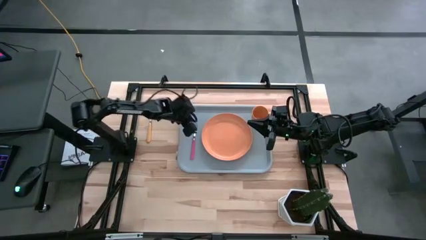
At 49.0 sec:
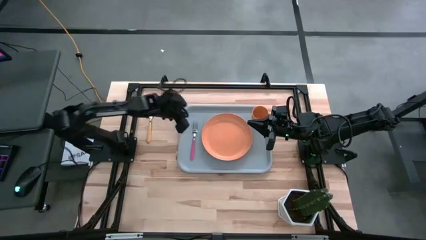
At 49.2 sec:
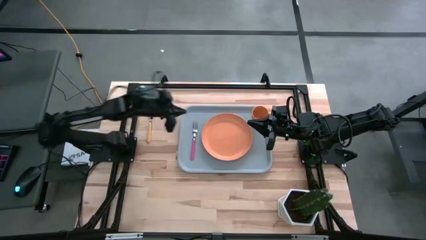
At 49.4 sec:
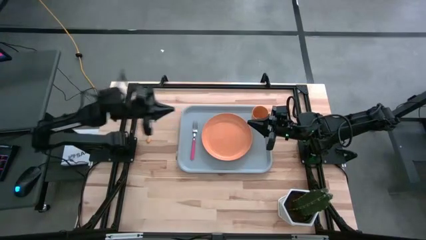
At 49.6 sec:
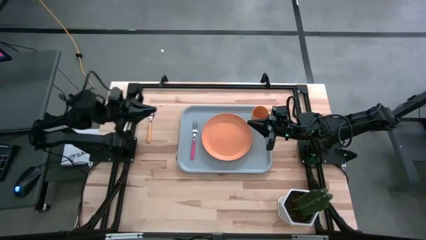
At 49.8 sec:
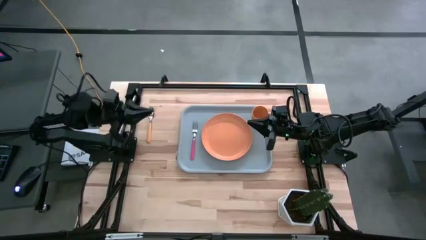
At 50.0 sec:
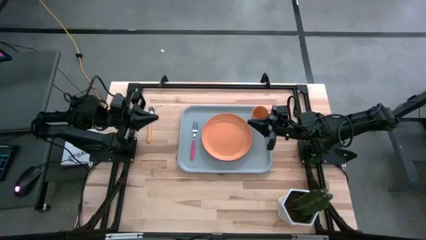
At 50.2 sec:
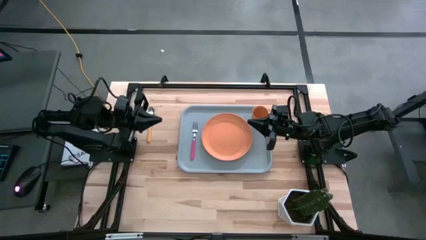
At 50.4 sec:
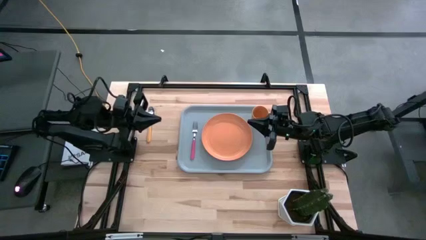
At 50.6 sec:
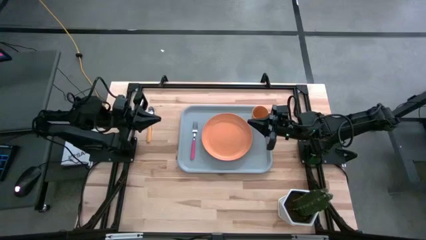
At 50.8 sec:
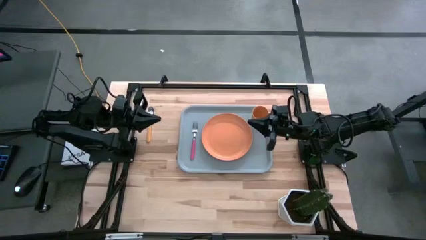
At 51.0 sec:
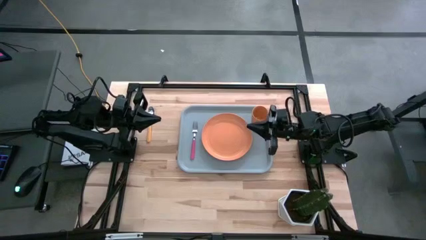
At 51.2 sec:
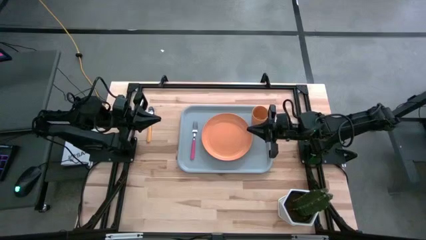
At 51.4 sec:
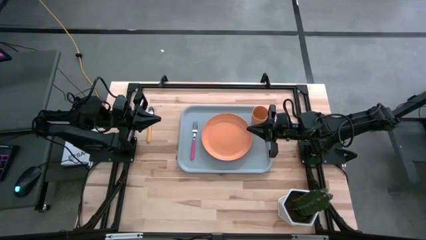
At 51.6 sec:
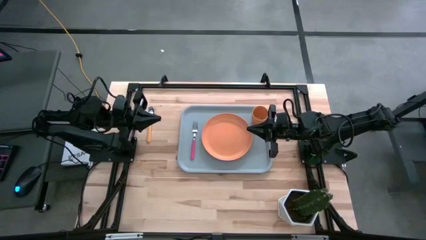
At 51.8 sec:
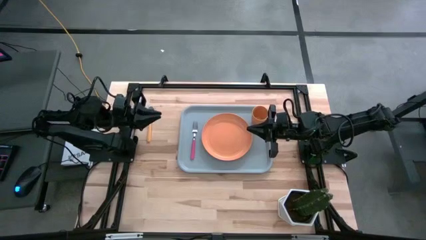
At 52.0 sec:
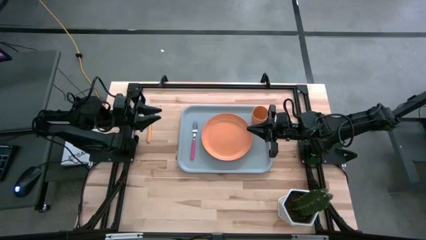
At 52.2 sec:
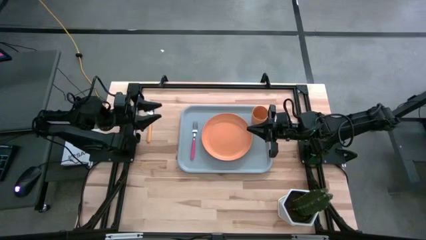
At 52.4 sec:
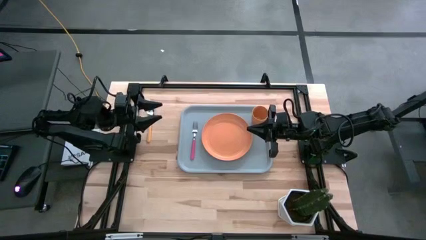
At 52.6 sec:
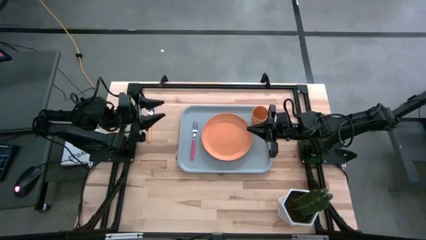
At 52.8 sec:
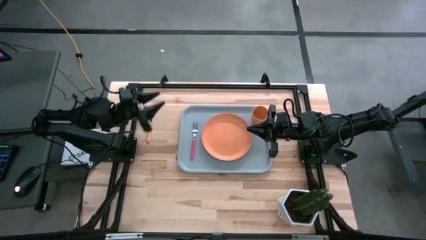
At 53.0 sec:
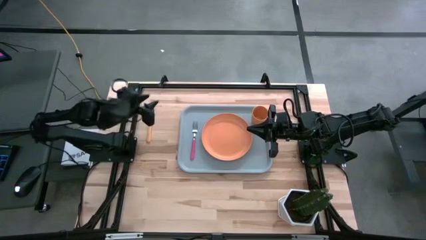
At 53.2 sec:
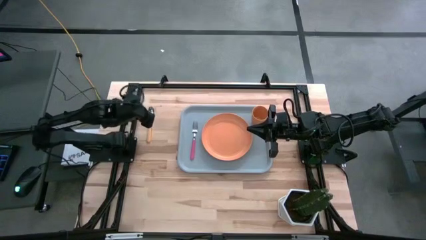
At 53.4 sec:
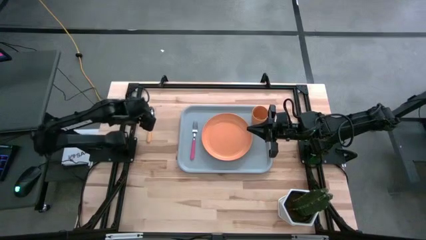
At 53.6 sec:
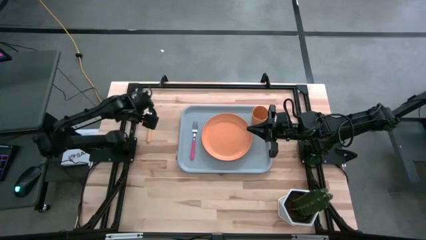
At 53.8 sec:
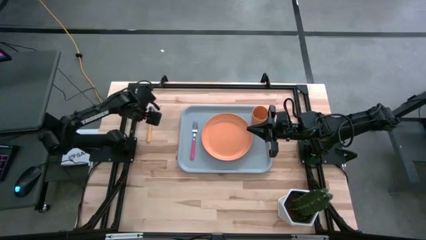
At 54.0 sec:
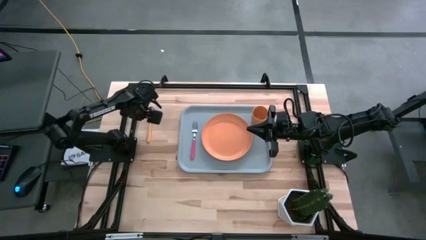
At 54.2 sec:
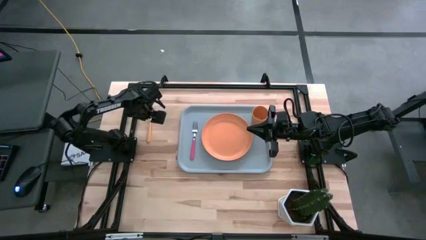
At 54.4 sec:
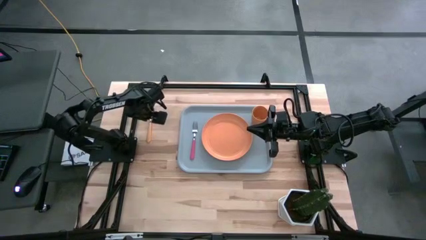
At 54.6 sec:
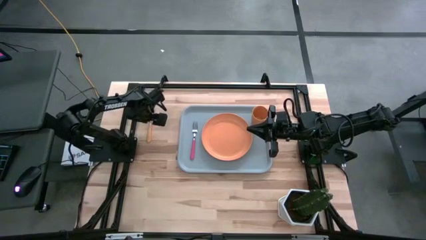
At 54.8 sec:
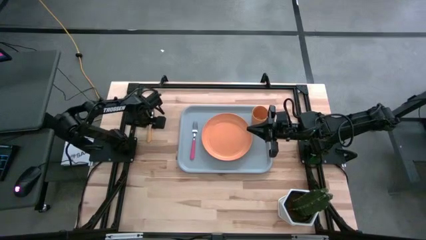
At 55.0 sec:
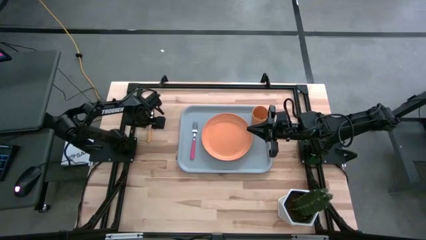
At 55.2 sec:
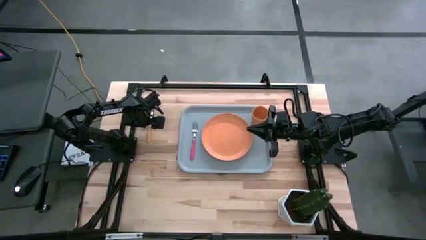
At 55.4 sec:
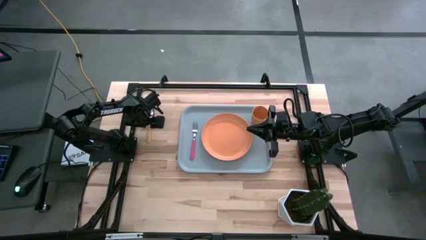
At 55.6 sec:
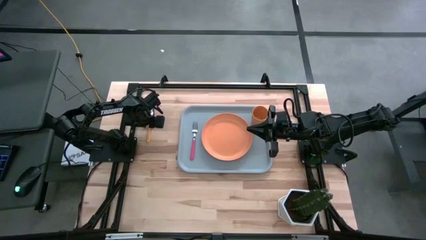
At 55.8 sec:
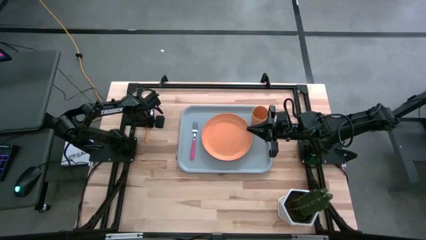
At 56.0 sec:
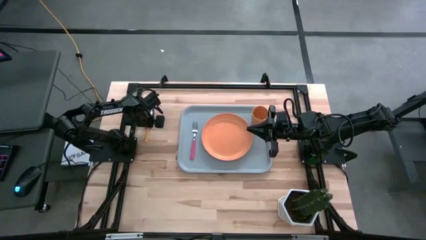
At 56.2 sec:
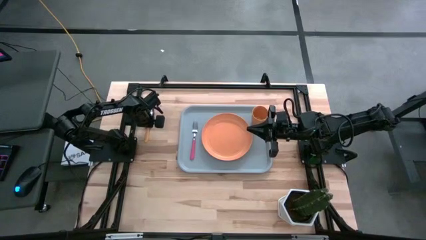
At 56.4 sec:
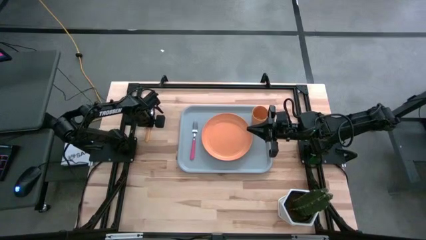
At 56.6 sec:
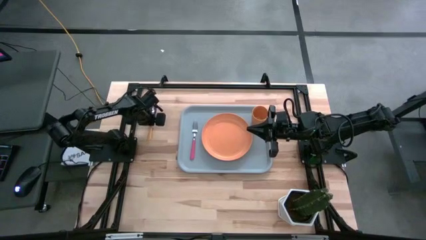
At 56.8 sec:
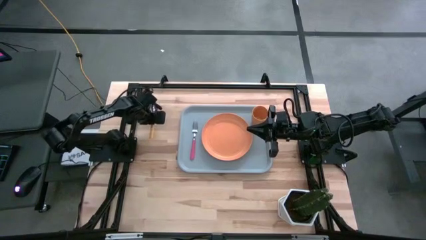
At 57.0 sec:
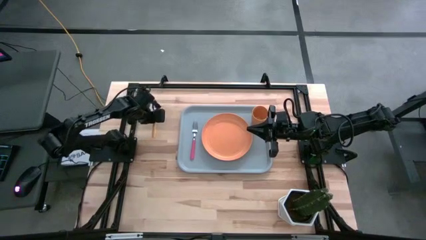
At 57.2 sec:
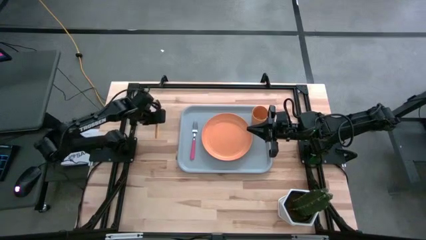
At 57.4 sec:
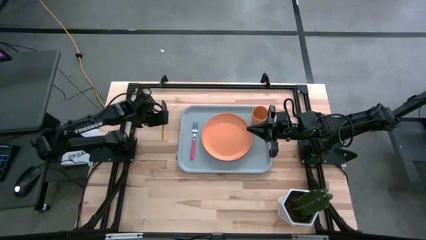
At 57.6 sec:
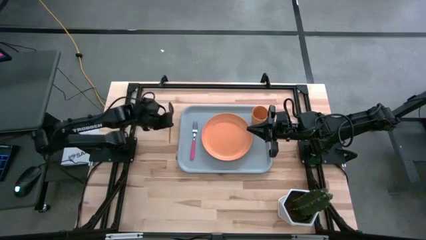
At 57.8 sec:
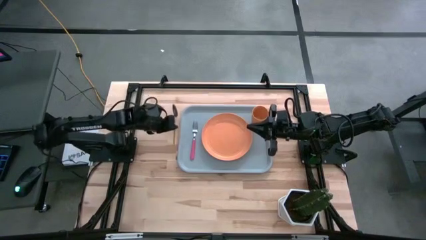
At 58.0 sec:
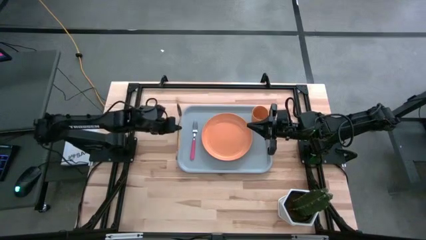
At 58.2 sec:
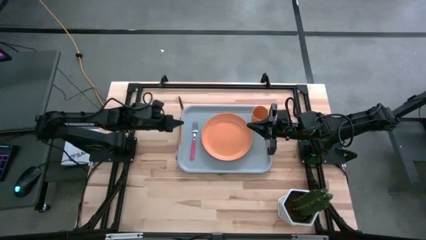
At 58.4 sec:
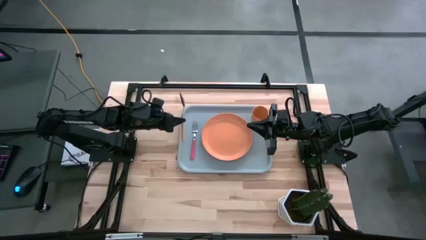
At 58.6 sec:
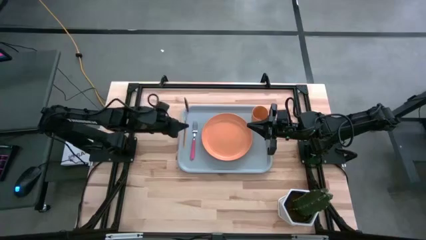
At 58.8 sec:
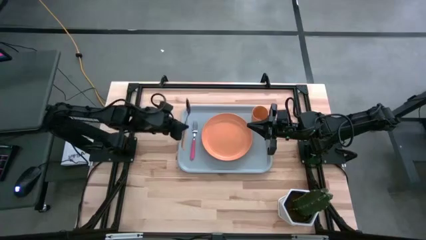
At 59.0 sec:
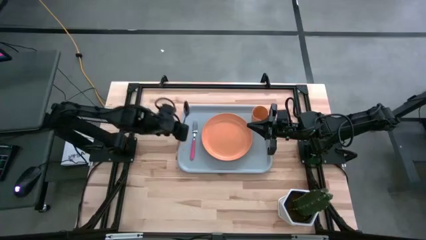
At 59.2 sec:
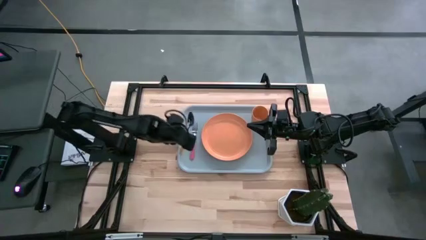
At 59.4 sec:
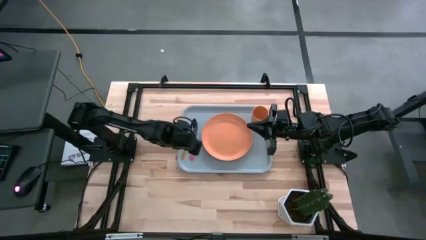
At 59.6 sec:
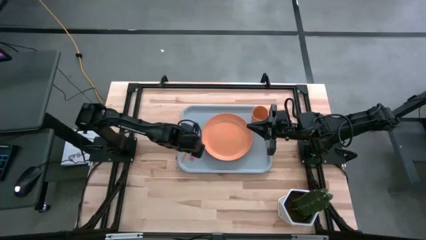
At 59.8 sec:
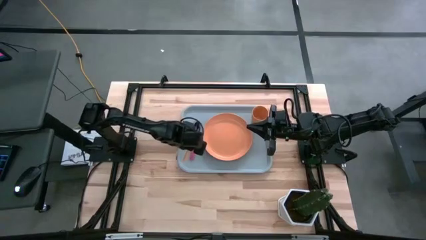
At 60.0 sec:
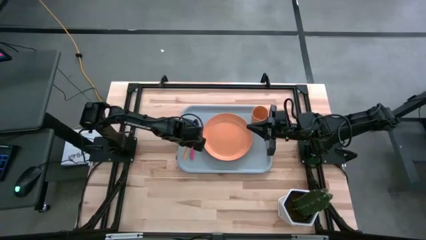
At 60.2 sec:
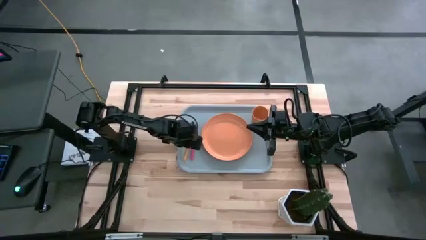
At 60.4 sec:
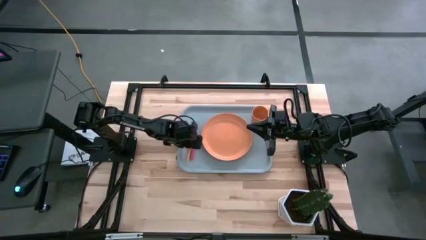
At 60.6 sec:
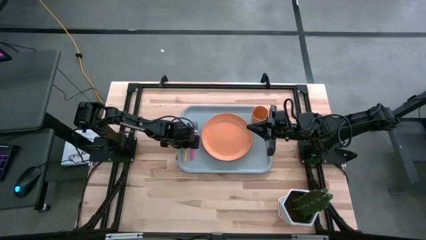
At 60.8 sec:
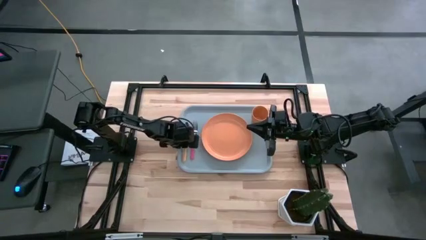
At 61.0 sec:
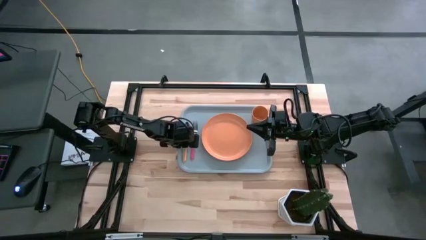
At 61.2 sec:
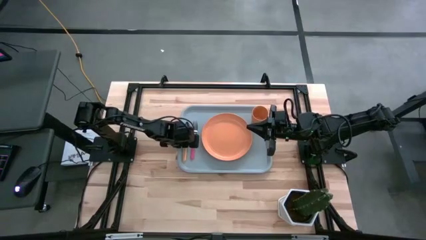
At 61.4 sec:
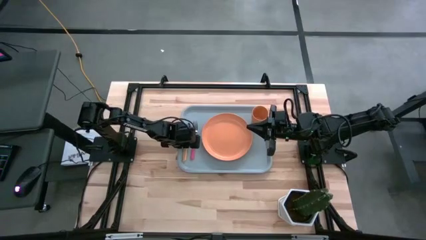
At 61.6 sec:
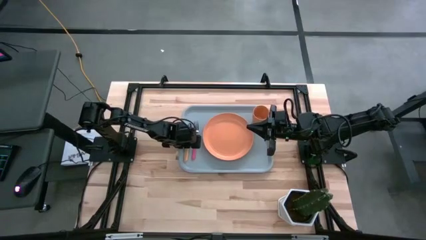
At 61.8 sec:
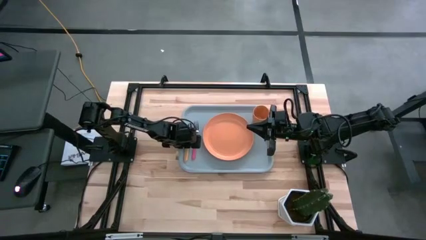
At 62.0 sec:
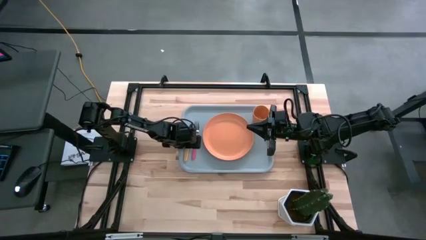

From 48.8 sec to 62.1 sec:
Task: Pick and place plate/cup/fork/spoon on tray
Put the yellow spoon on the gray tray to the left of the pink fork
